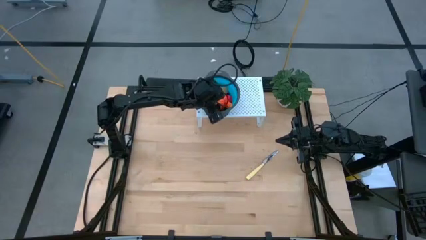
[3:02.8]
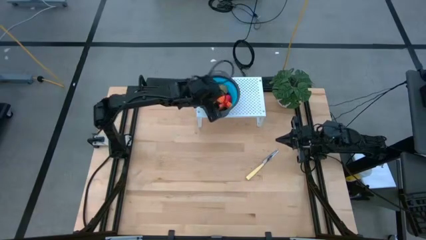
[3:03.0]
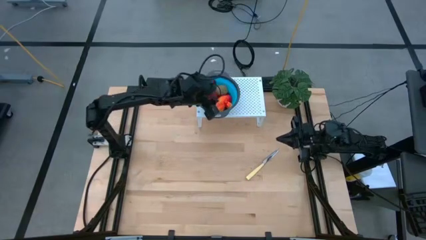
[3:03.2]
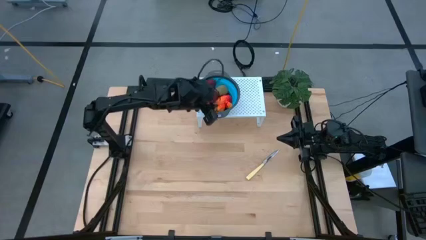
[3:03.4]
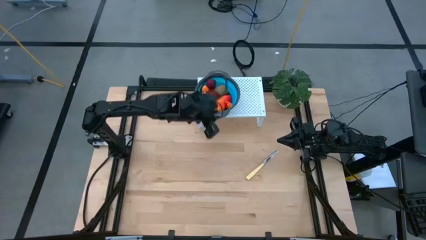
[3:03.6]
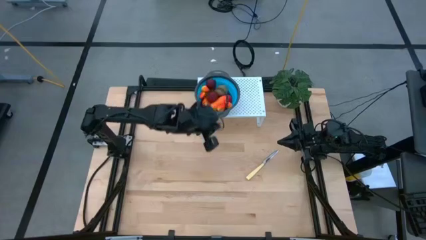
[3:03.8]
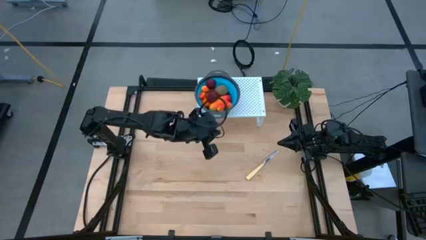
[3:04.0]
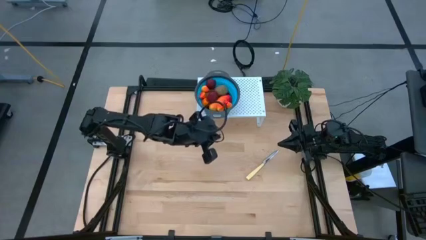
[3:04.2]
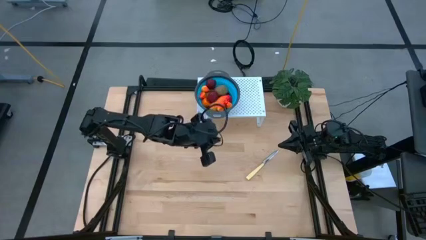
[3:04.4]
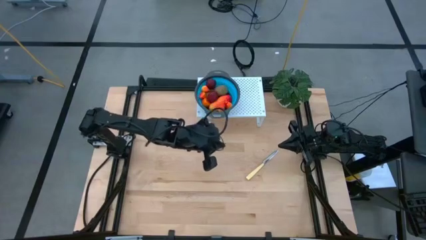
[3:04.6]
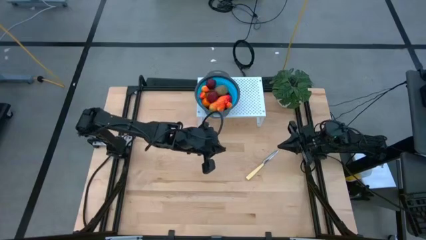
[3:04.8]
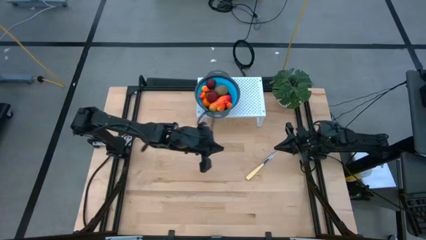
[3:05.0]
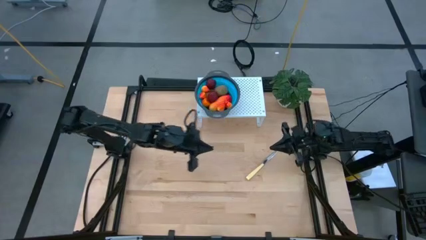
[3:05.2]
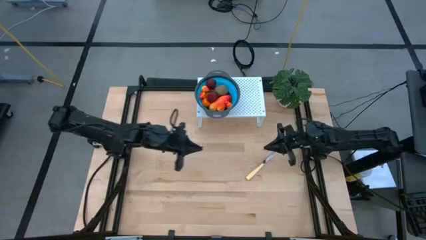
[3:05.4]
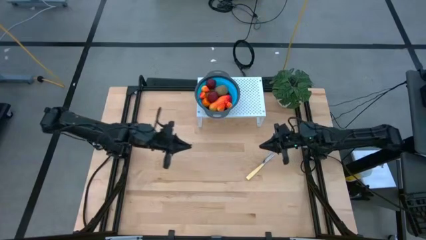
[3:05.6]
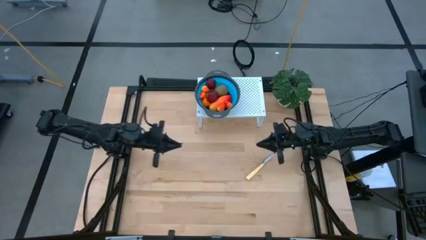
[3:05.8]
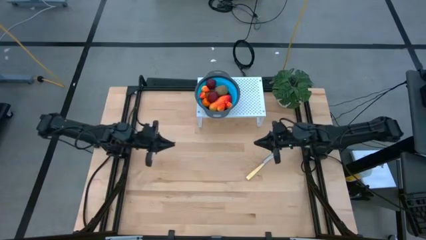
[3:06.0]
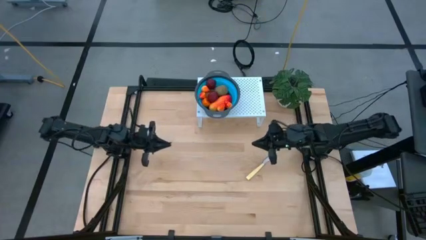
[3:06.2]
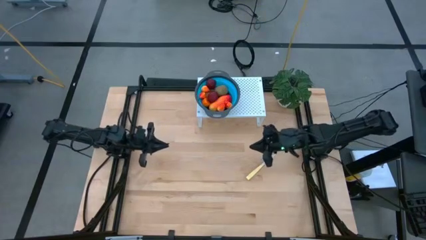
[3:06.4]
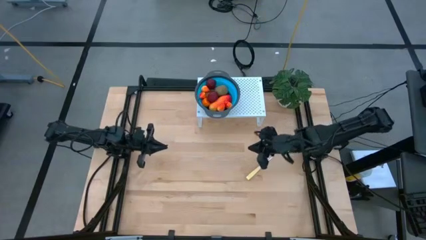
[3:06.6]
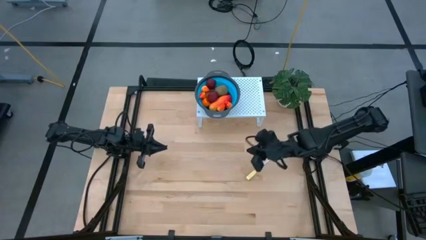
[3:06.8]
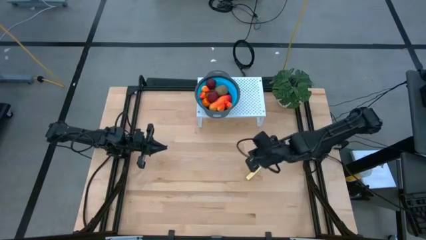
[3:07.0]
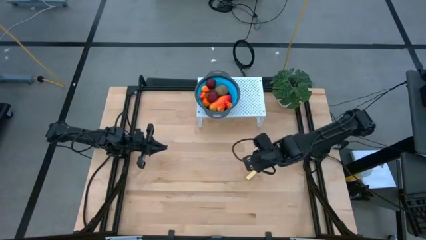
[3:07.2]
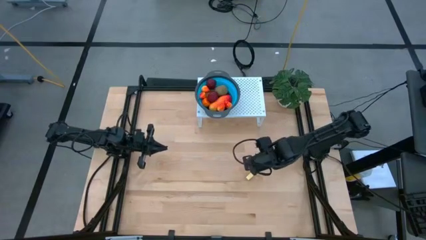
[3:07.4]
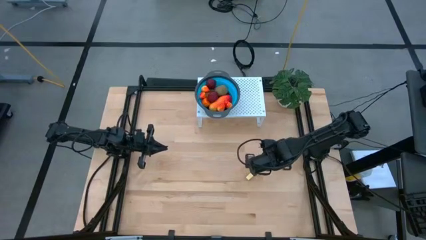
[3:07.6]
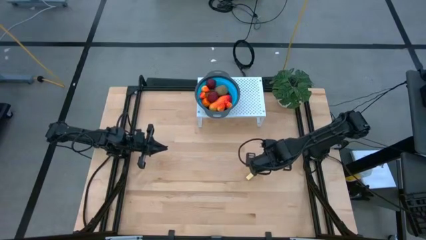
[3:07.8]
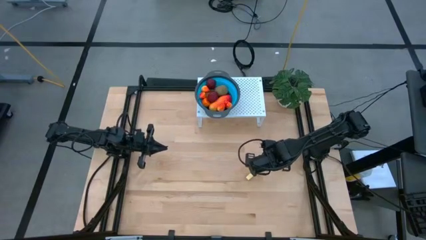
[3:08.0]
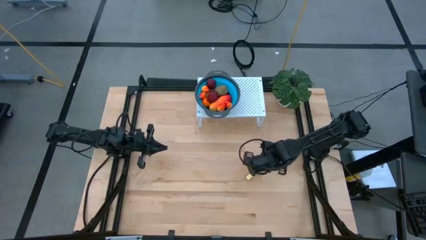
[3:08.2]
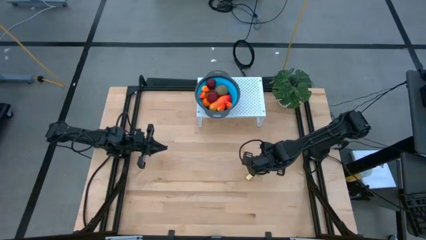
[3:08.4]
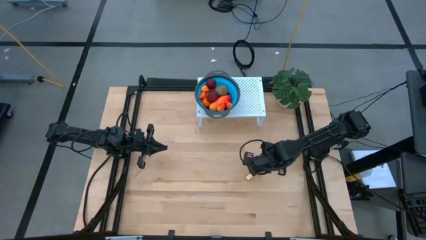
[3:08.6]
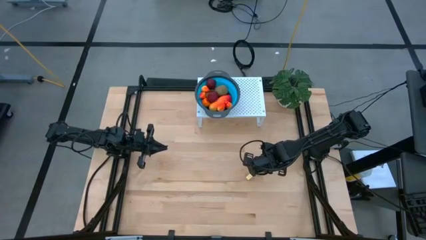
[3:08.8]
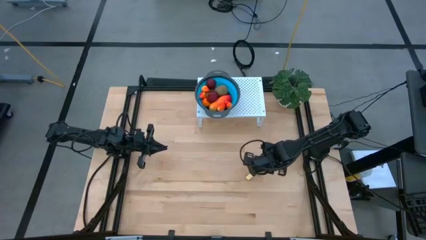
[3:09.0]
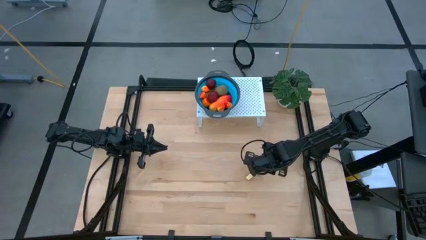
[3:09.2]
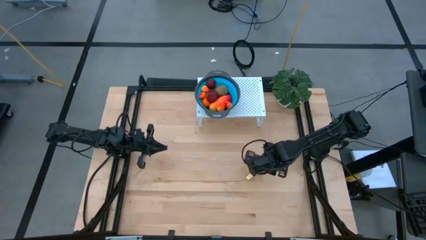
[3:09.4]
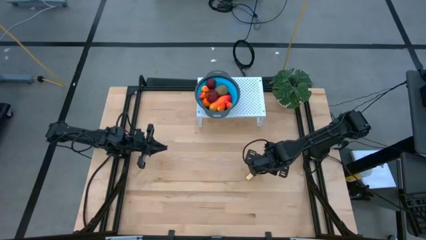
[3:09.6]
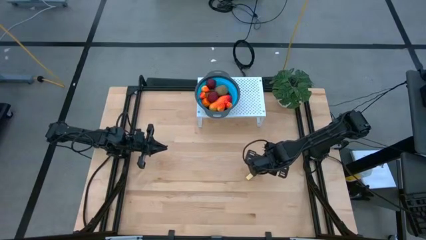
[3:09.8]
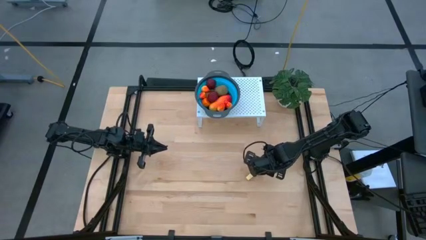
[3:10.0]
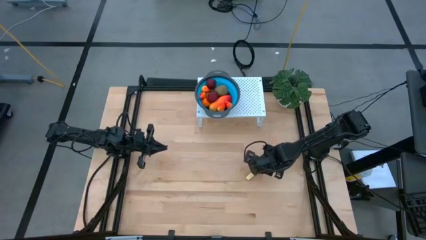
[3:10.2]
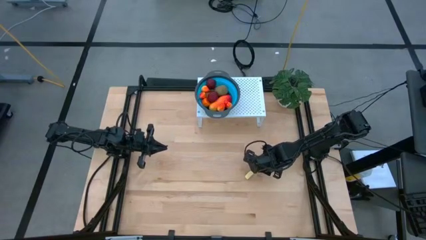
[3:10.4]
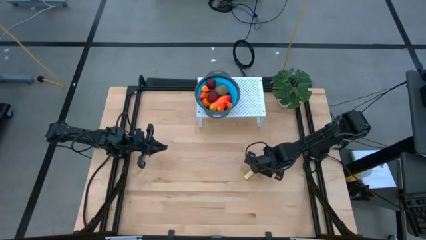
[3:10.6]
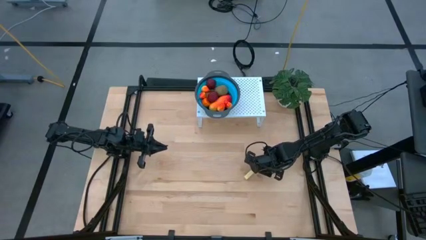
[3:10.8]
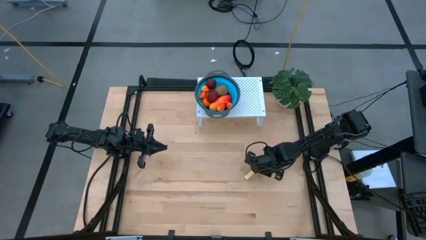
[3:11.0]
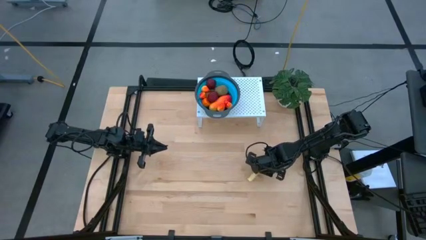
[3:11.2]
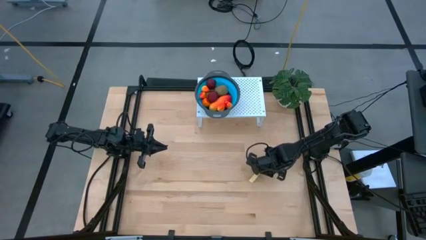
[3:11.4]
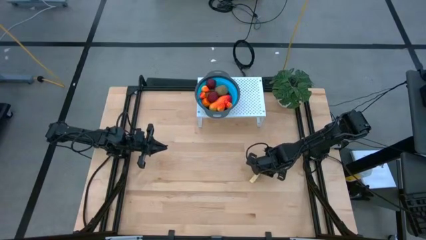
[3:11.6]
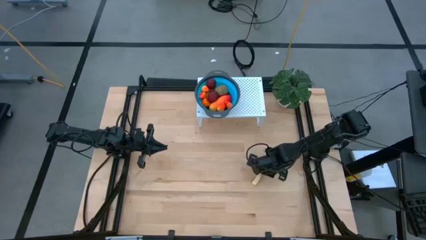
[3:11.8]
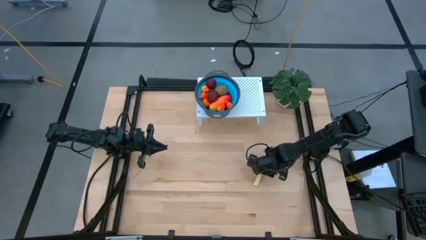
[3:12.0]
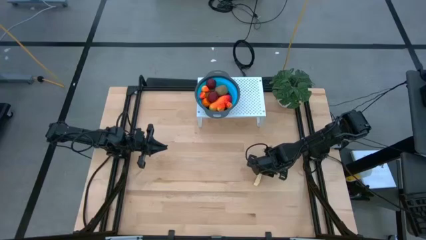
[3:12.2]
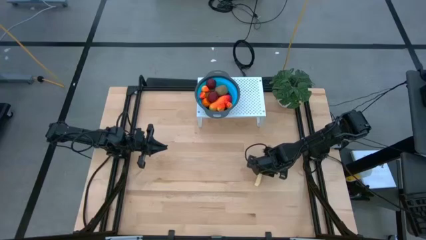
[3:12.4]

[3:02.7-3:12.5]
Task: Pick & Place Fruit
Put the yellow kitchen knife on the shelf

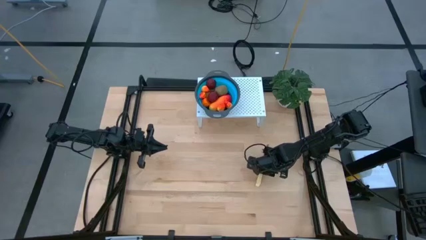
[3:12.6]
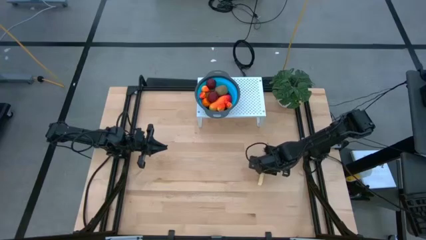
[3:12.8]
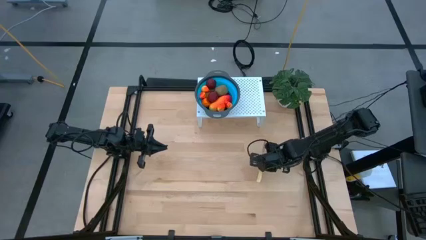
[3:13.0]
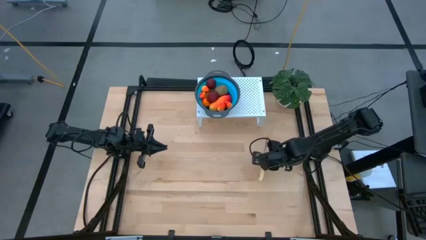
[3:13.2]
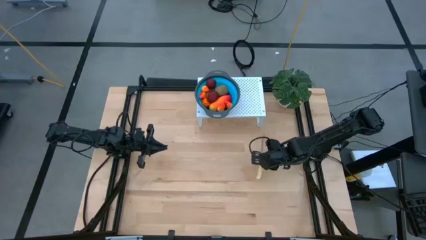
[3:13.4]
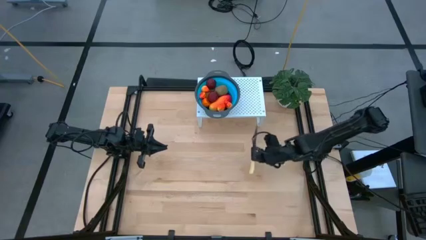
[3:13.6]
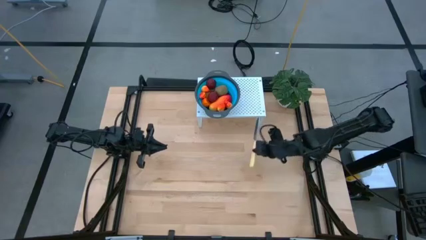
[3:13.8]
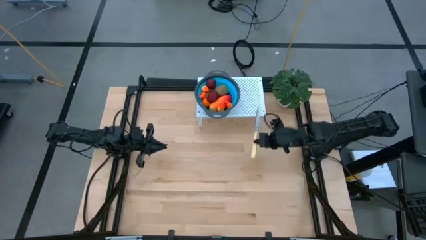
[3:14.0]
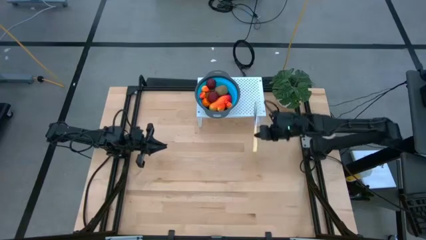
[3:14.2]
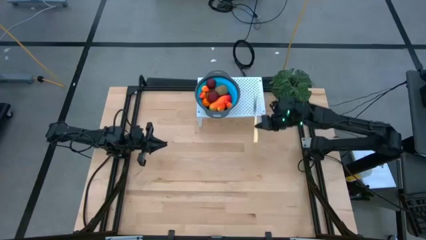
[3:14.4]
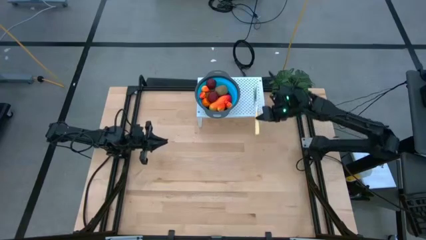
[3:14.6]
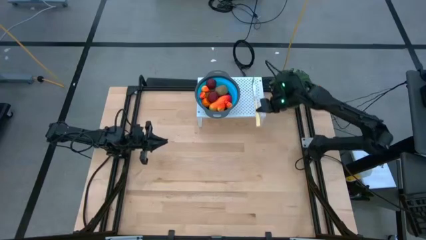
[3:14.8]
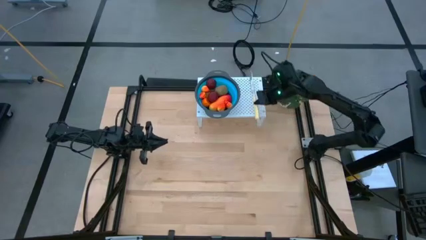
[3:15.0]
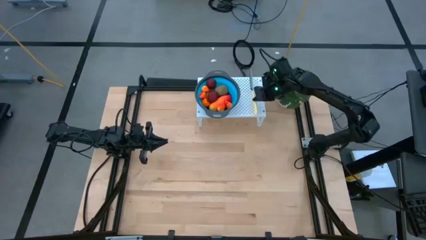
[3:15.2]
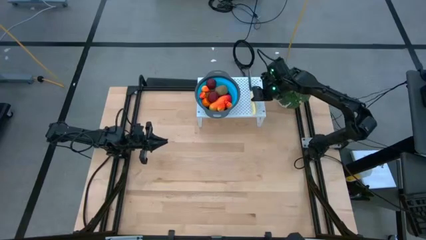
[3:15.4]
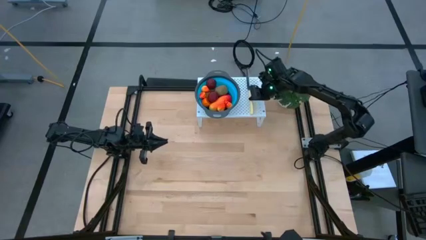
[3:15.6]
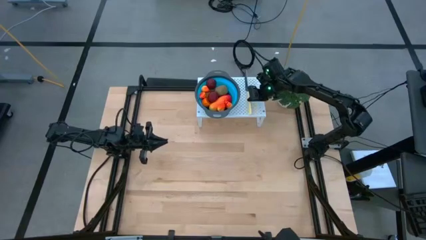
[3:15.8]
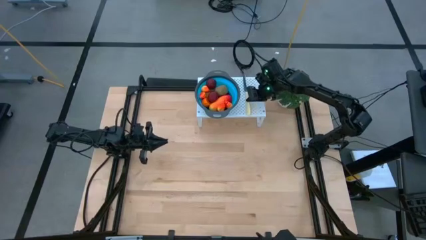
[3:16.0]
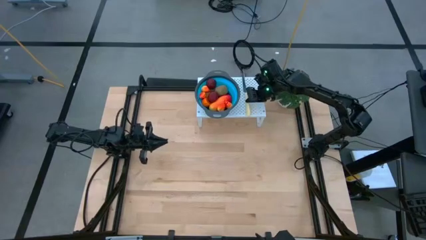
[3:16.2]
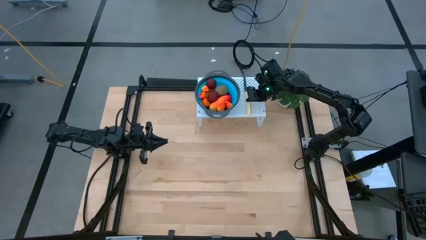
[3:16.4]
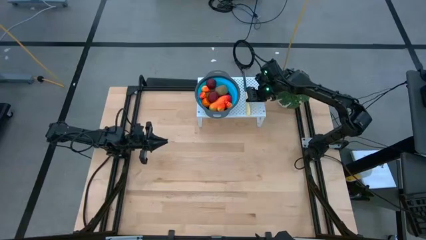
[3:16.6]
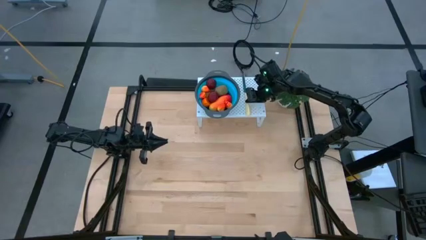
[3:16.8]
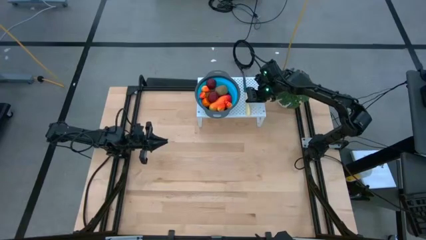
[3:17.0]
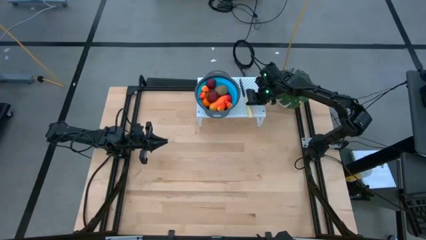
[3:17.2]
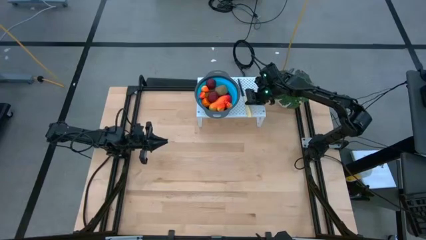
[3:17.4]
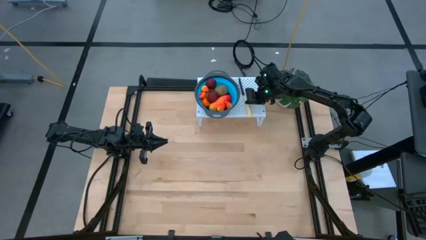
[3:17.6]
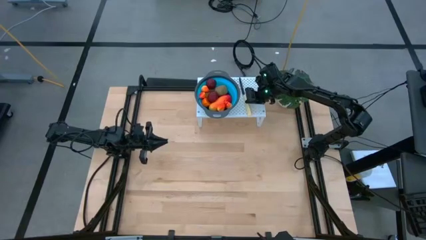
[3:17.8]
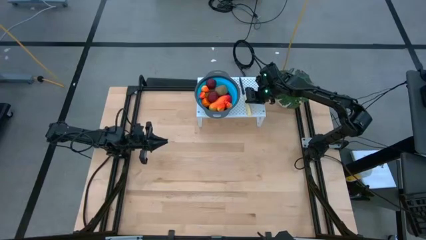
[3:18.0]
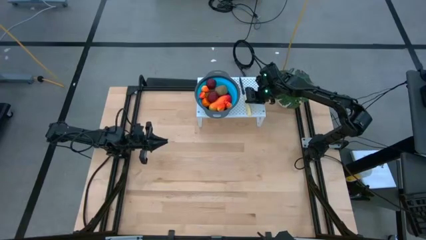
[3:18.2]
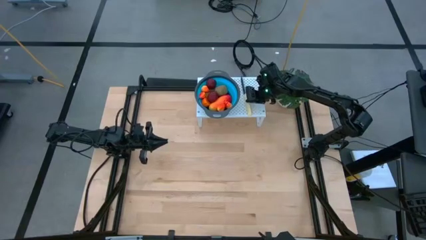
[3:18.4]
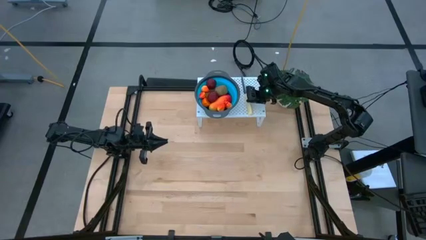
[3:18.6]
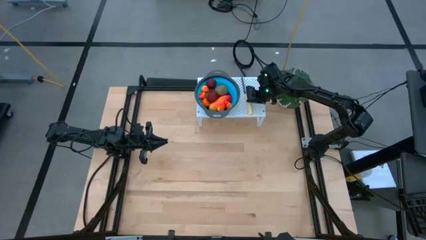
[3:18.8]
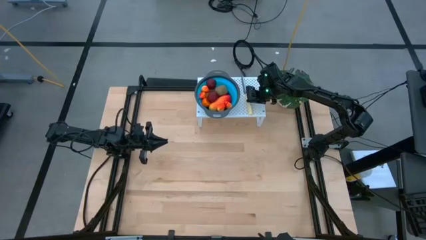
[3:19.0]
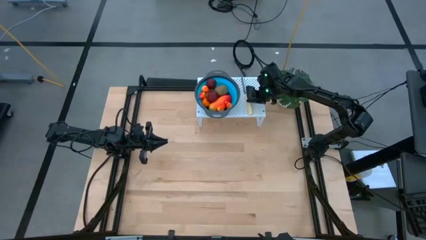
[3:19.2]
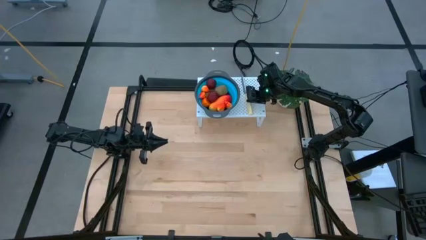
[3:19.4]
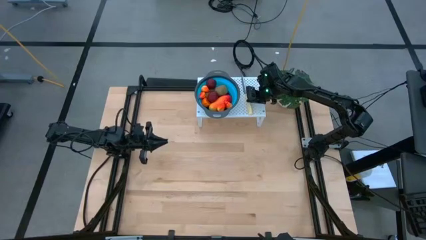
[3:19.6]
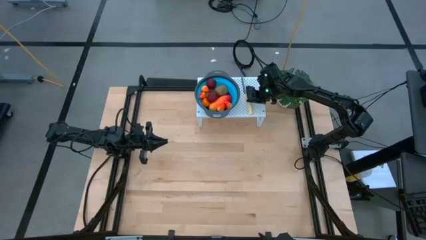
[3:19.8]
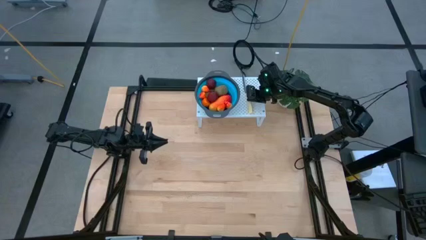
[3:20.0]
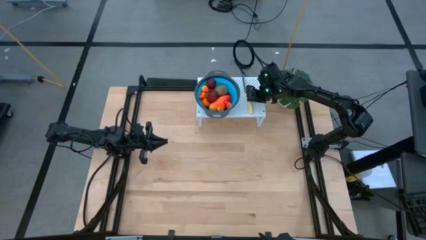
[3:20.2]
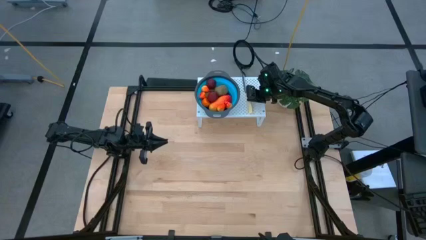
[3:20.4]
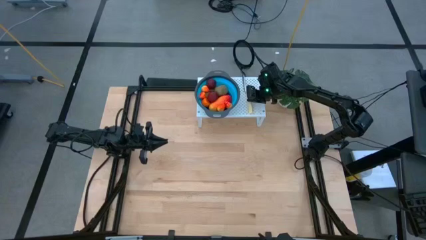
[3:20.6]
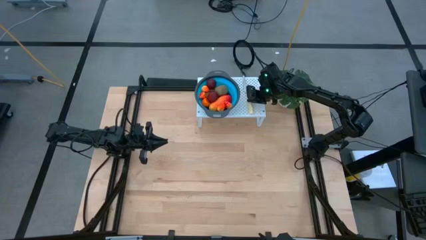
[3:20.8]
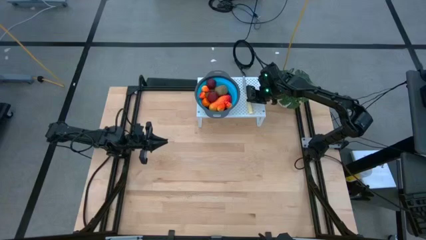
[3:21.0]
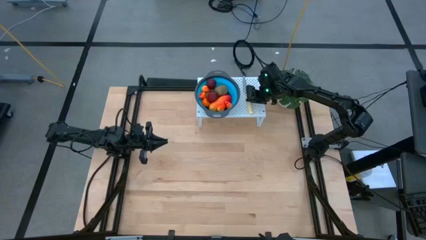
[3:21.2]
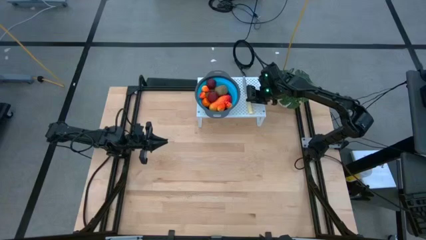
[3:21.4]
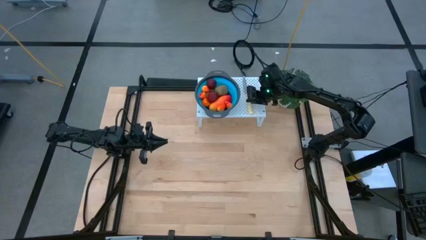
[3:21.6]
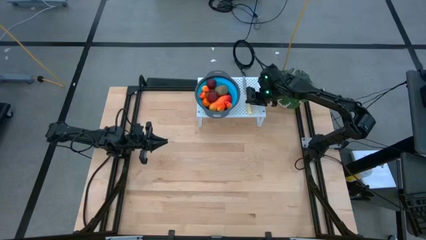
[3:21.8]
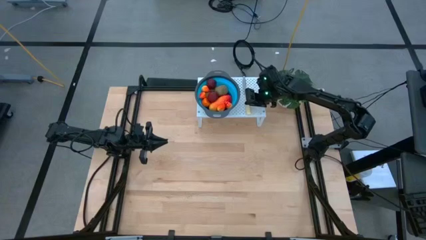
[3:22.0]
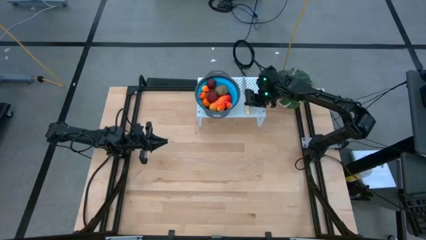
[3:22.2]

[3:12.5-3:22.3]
Put the yellow kitchen knife on the shelf
